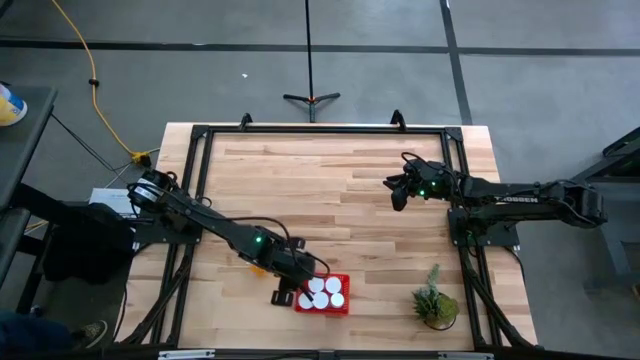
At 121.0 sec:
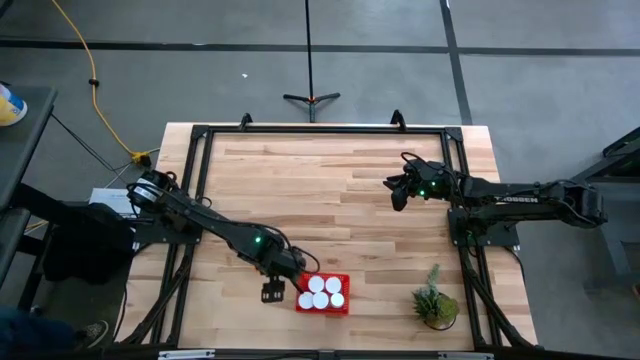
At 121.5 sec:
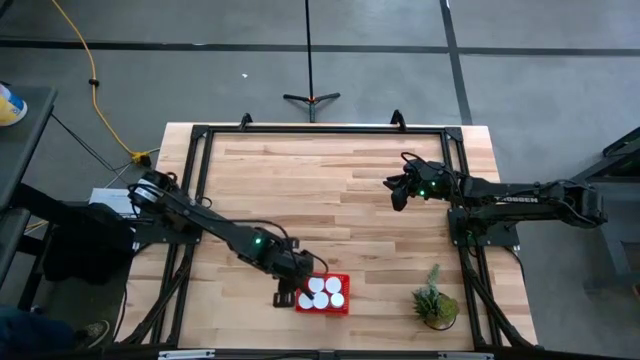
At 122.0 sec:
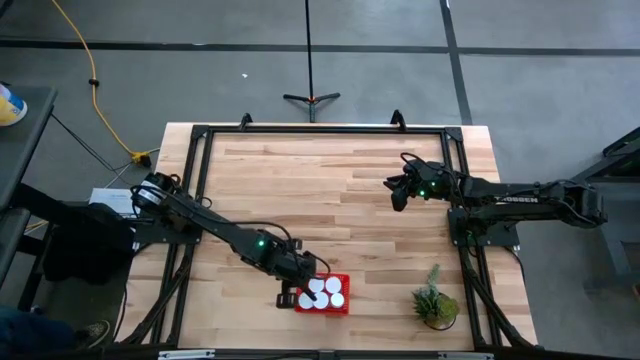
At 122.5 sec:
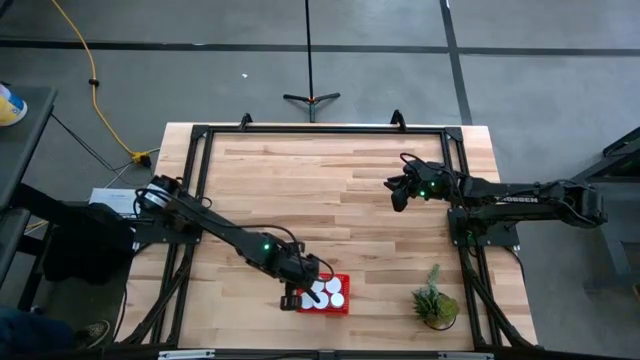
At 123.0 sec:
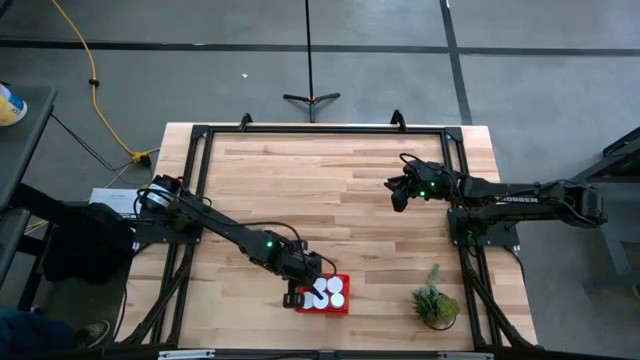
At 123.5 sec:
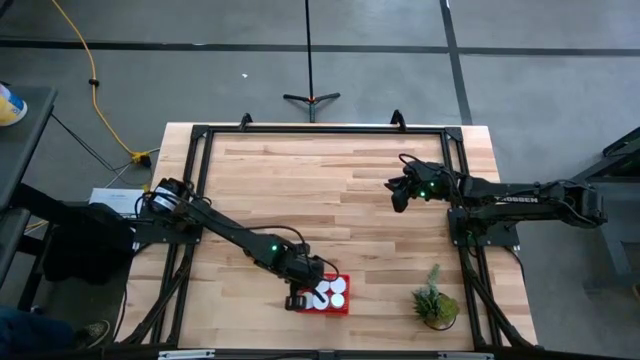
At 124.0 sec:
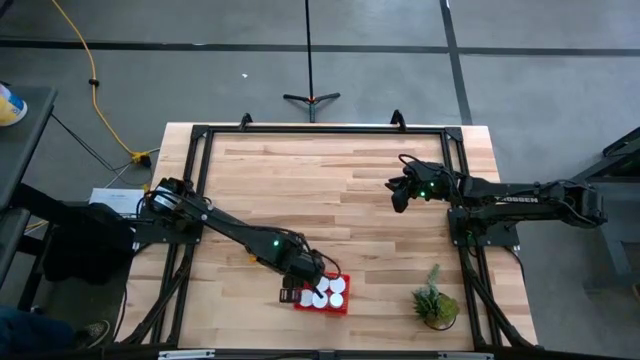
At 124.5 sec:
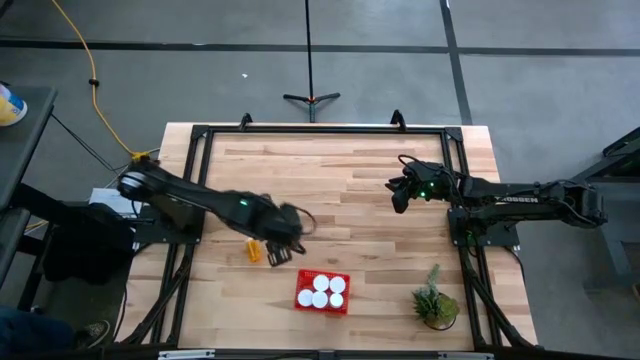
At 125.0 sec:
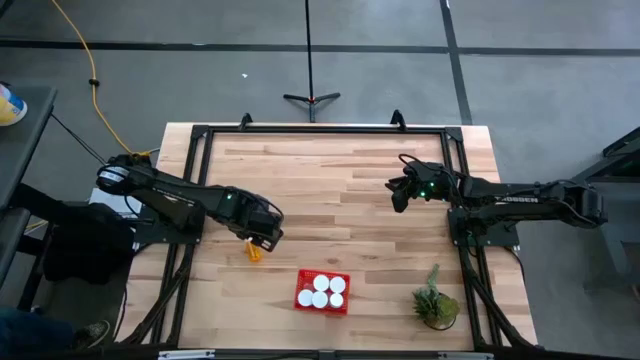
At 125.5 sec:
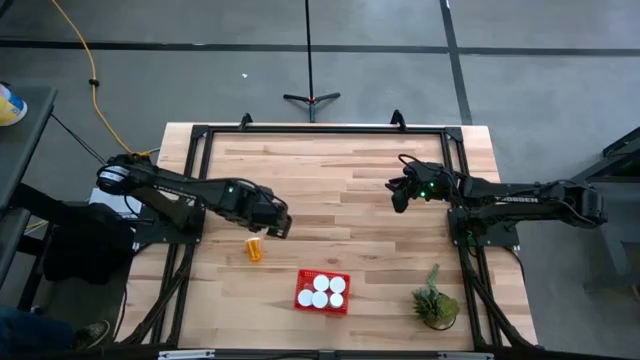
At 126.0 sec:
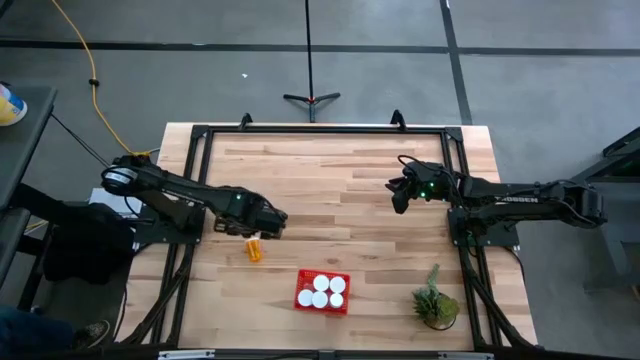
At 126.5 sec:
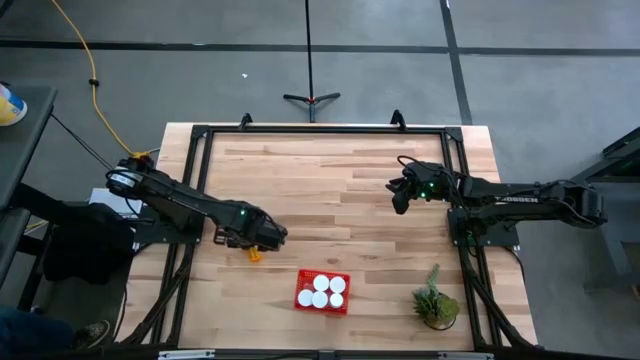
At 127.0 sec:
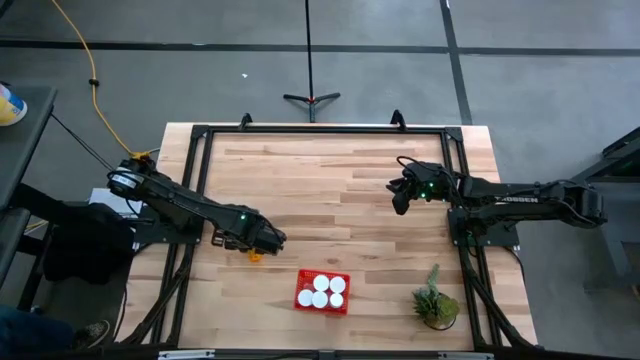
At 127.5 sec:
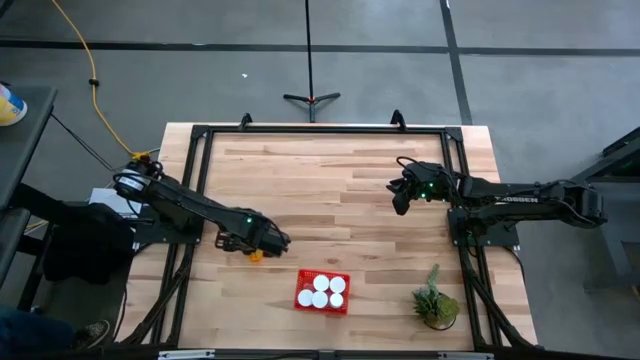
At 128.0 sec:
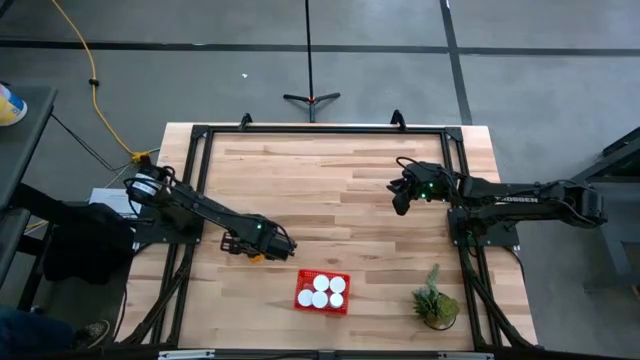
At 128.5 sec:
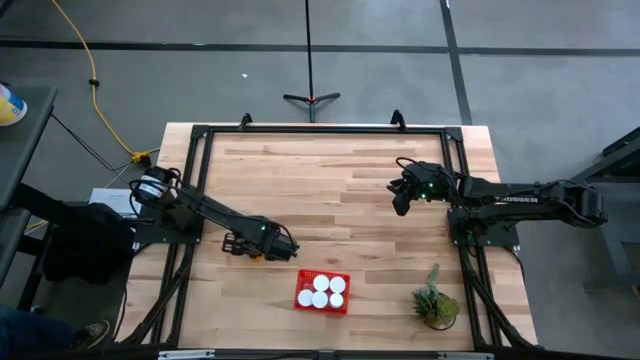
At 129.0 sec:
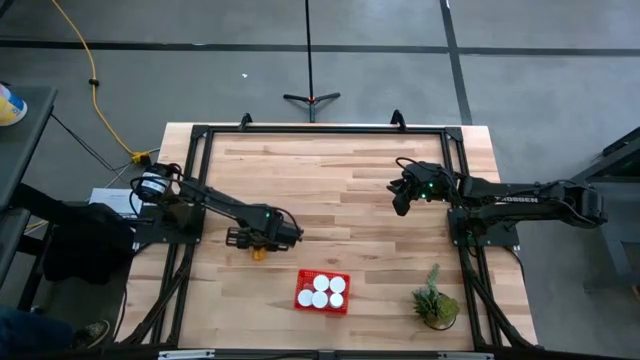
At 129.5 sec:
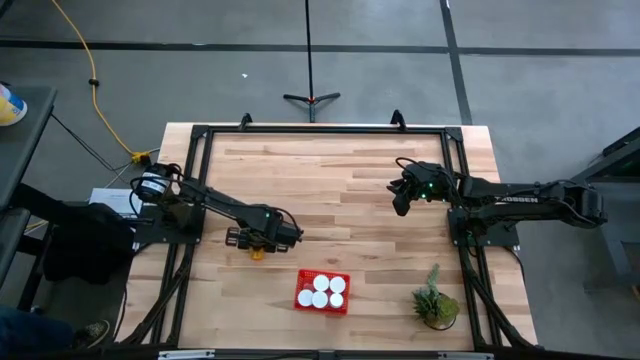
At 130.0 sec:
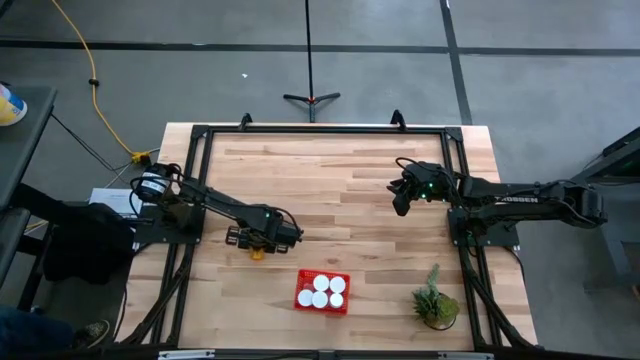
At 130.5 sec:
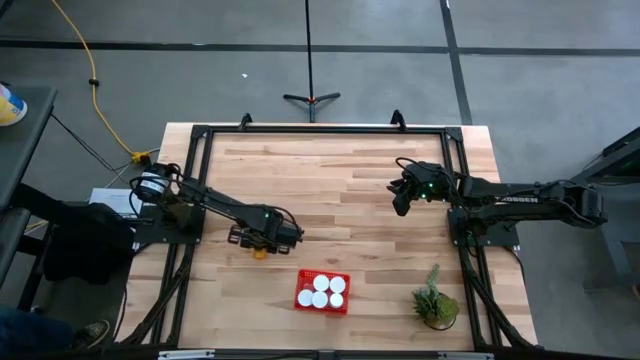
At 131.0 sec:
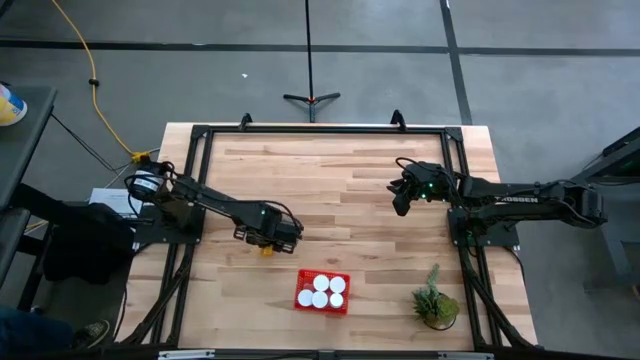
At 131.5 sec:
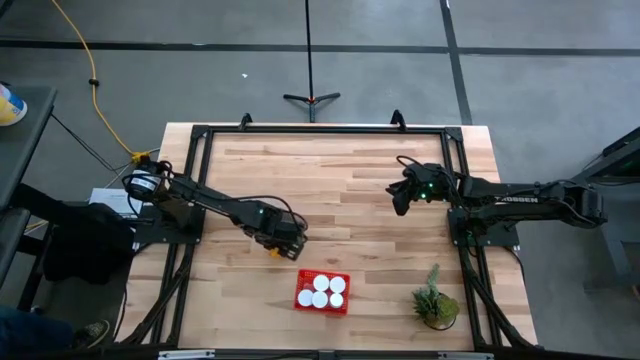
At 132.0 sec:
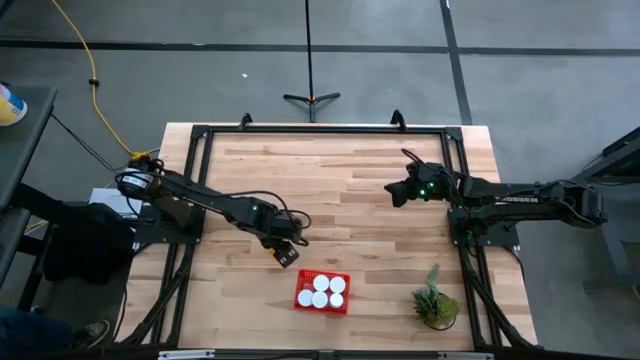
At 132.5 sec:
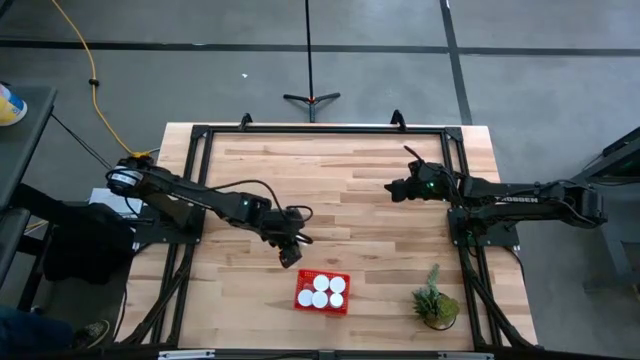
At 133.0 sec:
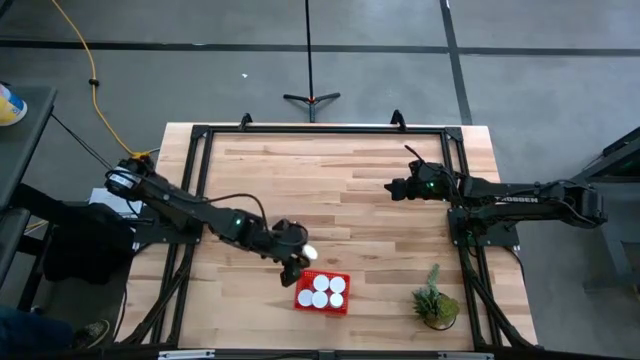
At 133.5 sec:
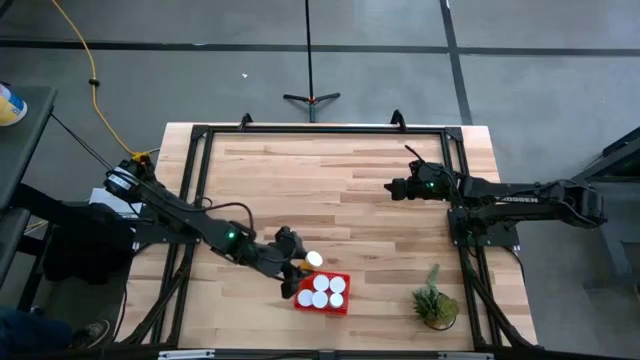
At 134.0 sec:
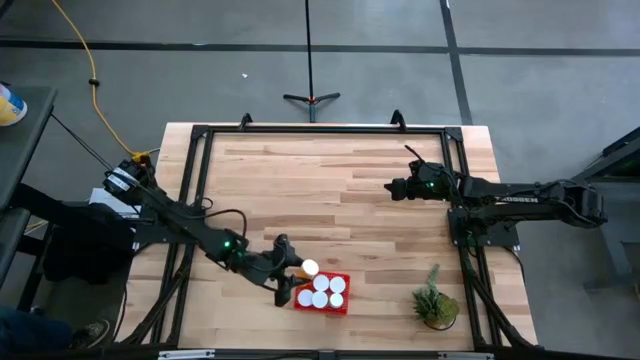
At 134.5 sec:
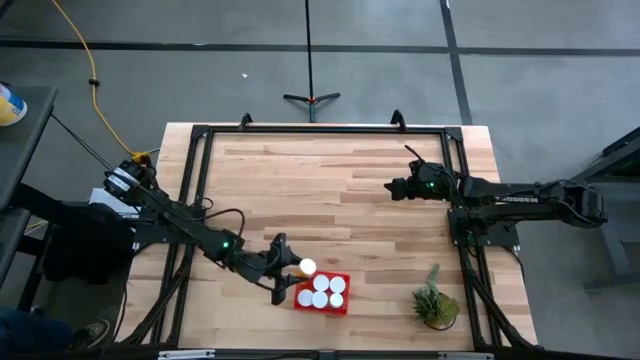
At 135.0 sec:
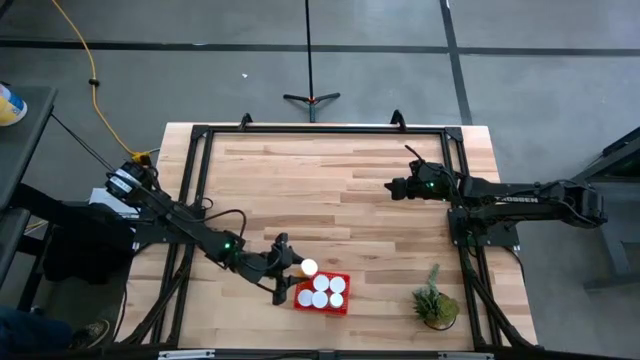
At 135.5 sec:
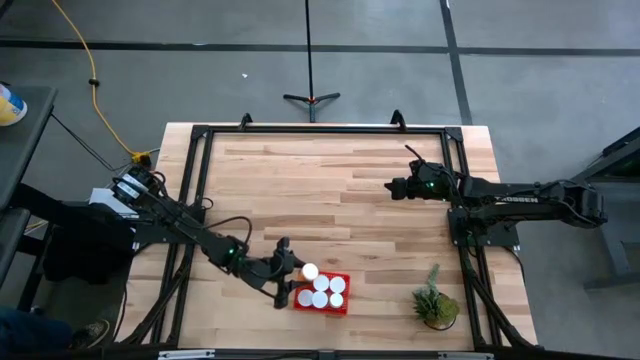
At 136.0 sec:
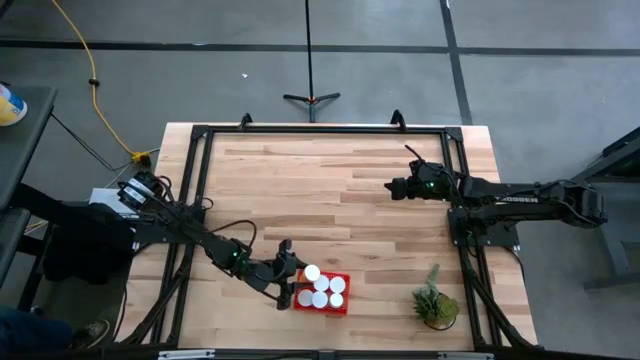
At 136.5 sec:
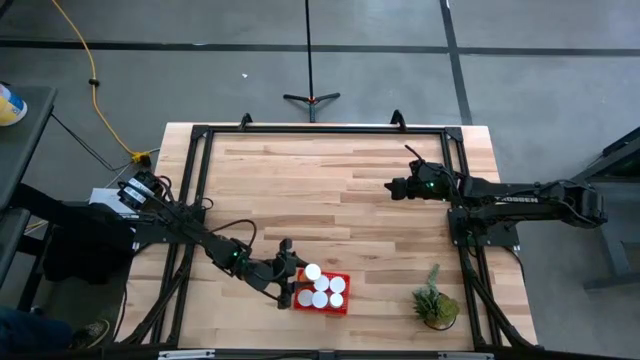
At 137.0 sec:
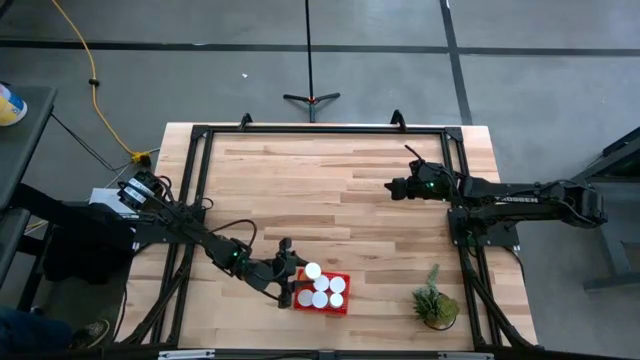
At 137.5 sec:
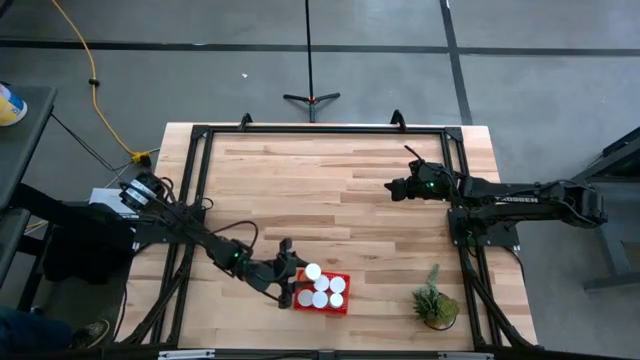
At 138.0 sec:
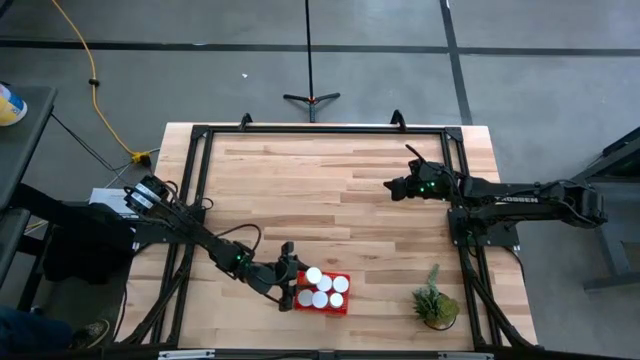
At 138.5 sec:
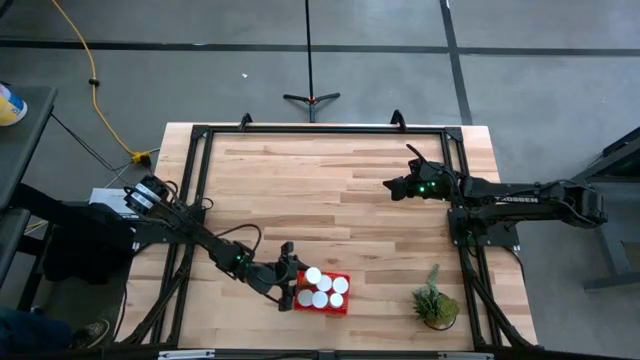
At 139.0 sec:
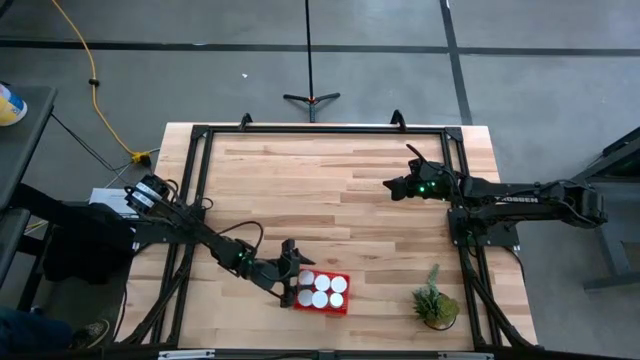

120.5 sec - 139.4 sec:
Task: Pick and place pill bottles into a basket
Put the orange pill bottle into the red basket

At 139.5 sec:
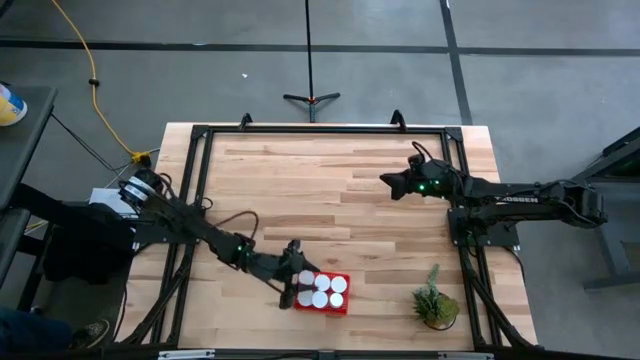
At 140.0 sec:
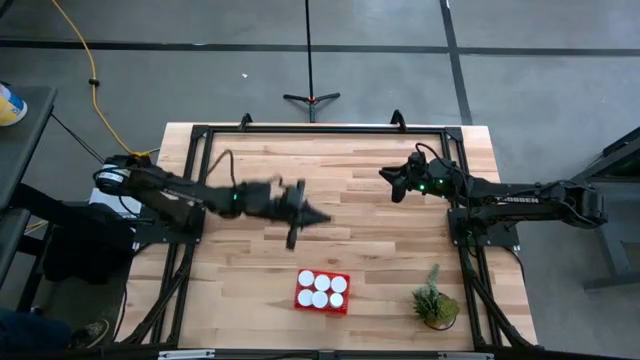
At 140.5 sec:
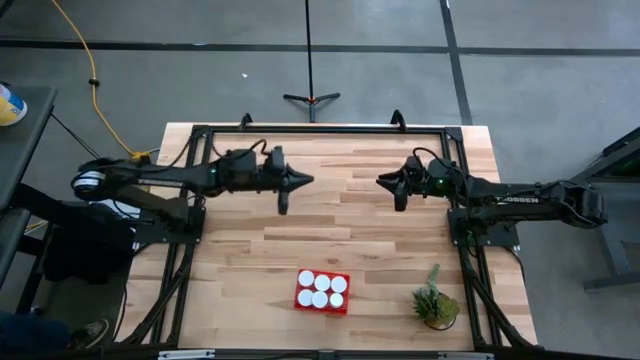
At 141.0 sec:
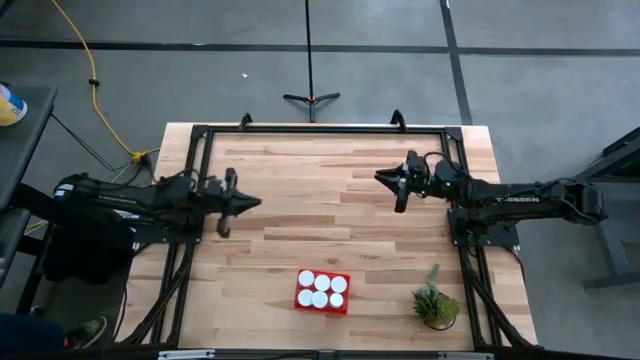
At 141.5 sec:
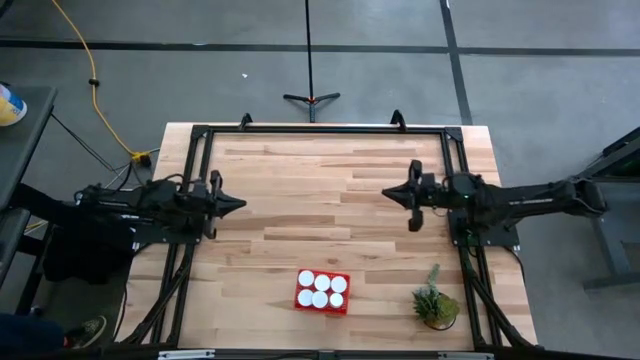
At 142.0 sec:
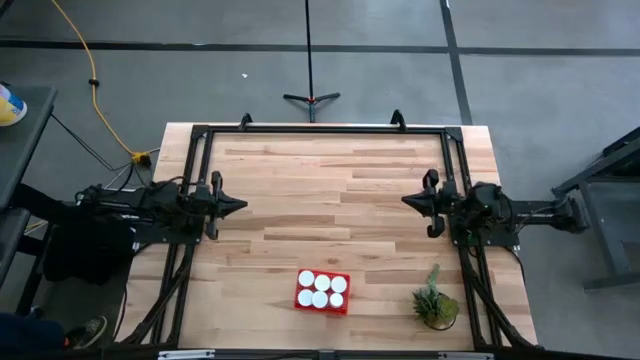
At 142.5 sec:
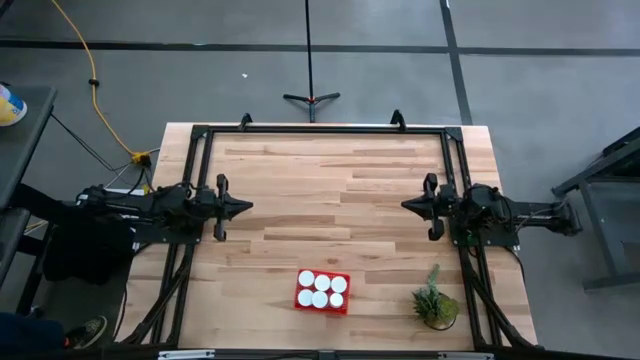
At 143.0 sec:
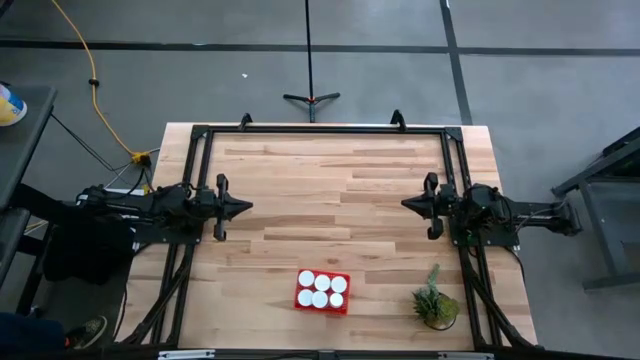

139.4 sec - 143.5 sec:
Return to Home Position
